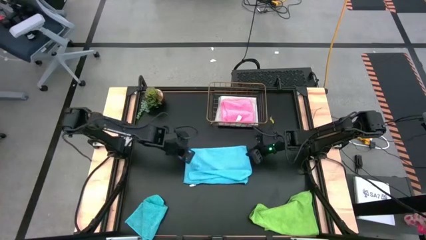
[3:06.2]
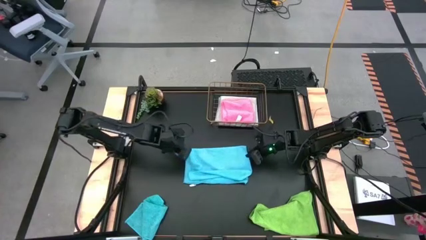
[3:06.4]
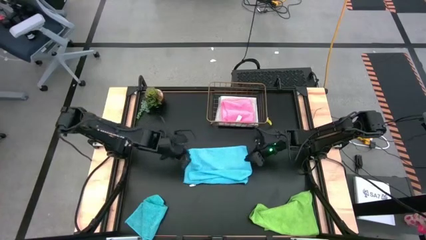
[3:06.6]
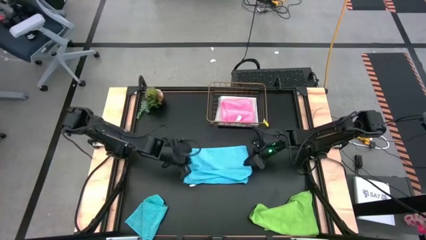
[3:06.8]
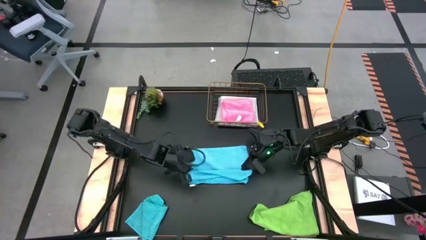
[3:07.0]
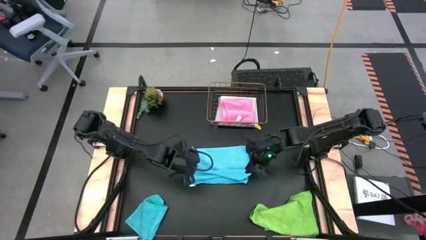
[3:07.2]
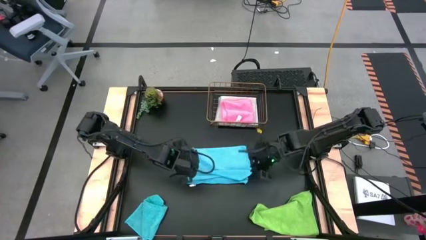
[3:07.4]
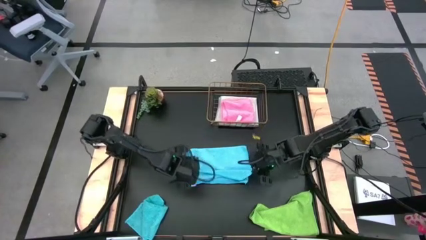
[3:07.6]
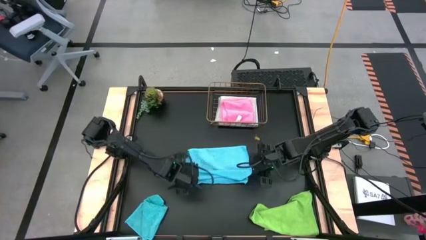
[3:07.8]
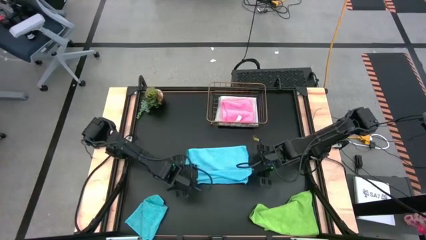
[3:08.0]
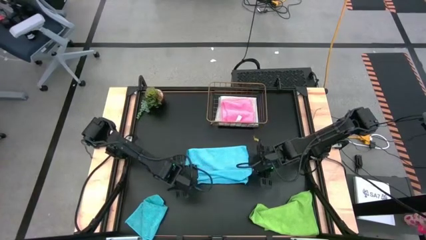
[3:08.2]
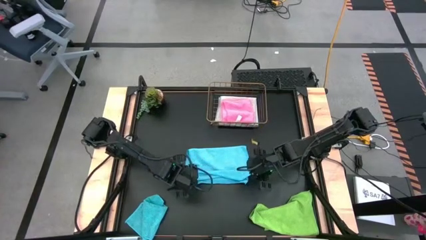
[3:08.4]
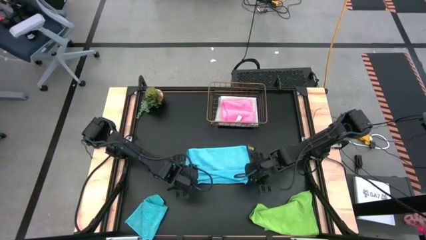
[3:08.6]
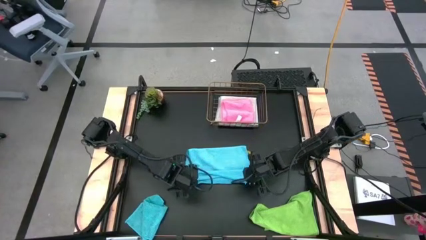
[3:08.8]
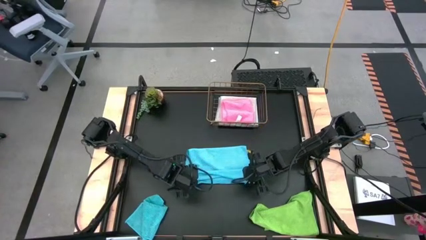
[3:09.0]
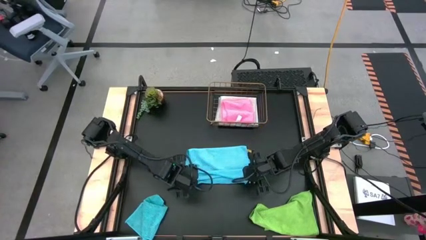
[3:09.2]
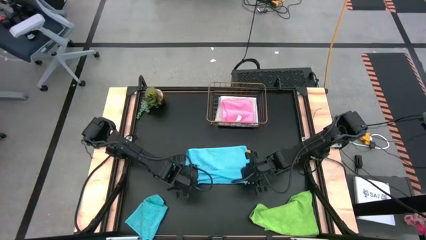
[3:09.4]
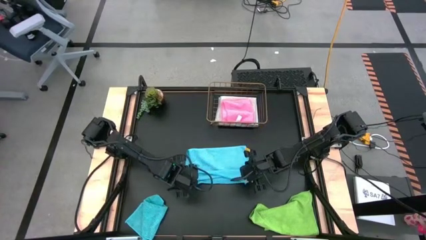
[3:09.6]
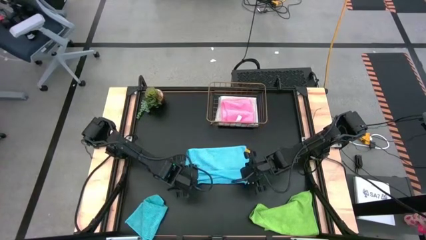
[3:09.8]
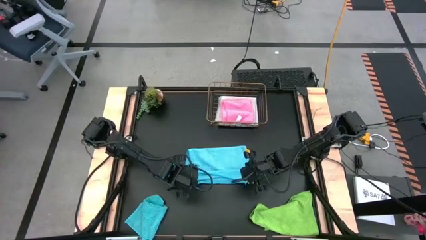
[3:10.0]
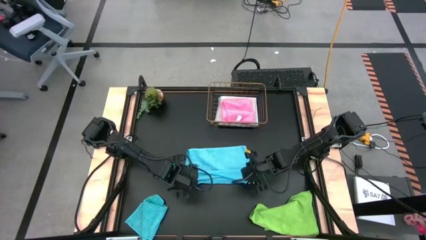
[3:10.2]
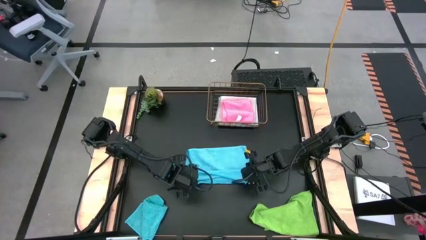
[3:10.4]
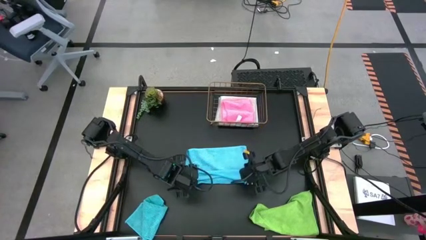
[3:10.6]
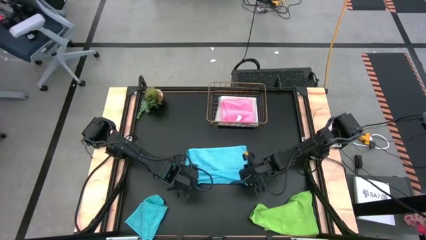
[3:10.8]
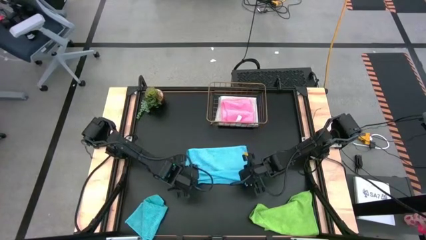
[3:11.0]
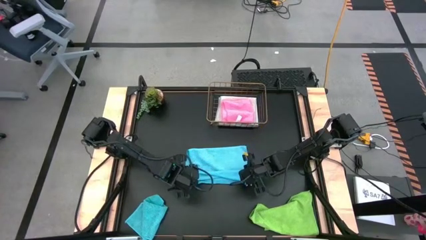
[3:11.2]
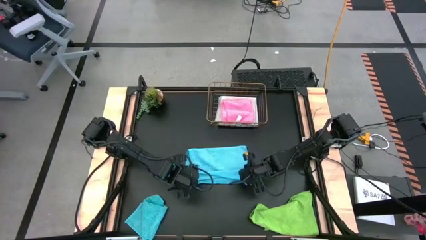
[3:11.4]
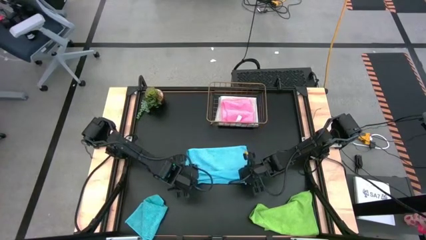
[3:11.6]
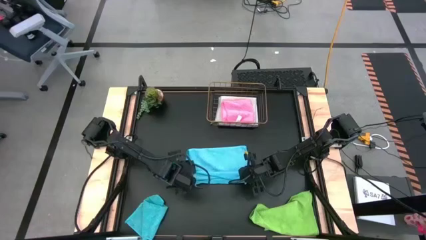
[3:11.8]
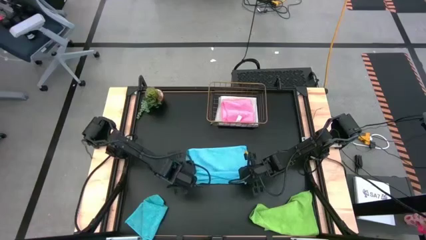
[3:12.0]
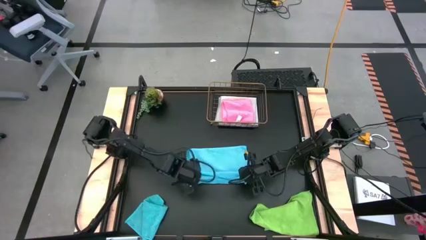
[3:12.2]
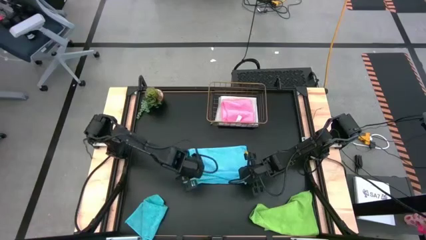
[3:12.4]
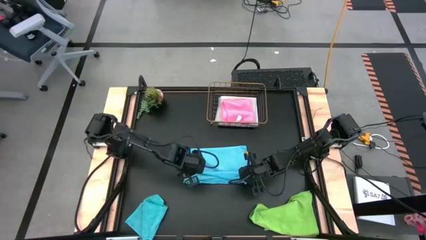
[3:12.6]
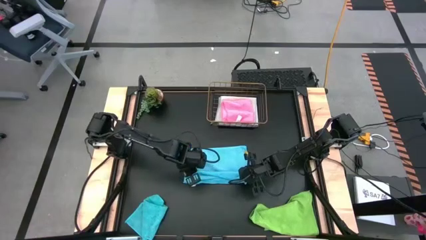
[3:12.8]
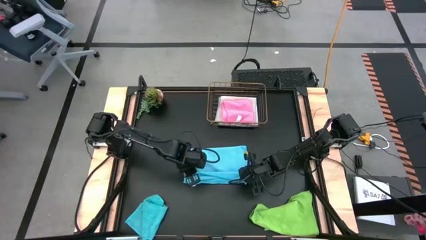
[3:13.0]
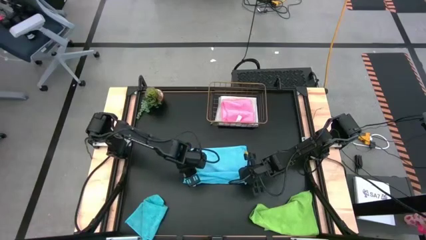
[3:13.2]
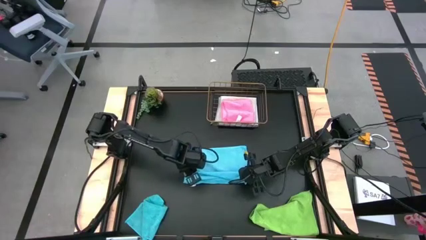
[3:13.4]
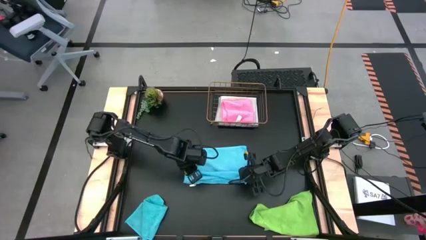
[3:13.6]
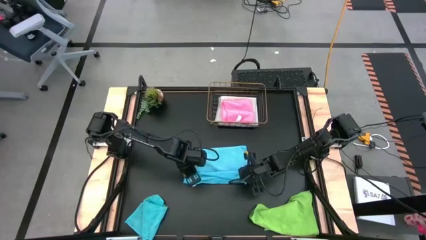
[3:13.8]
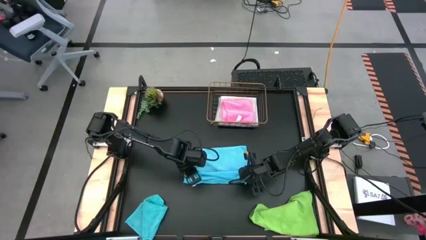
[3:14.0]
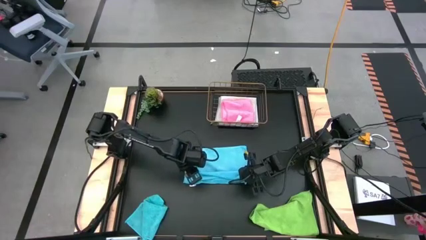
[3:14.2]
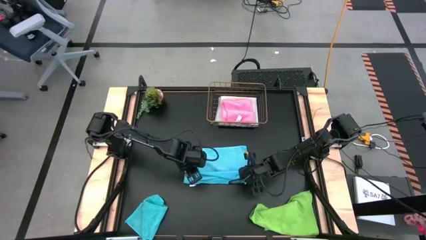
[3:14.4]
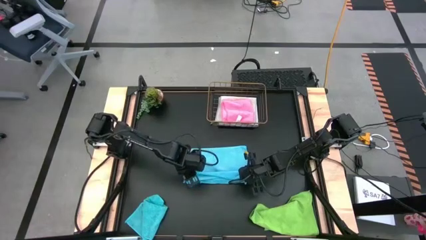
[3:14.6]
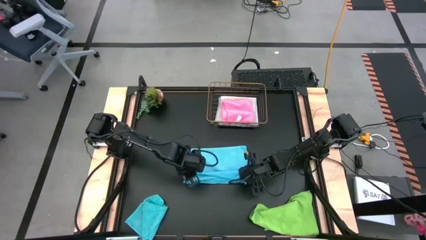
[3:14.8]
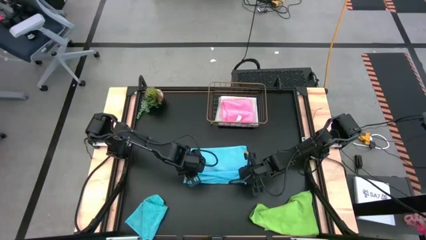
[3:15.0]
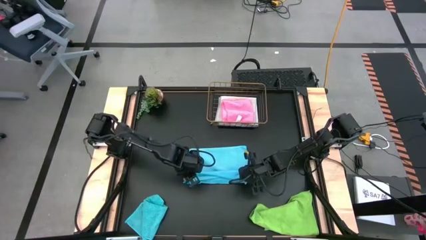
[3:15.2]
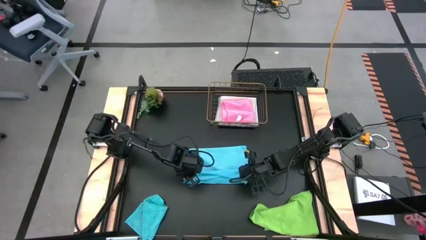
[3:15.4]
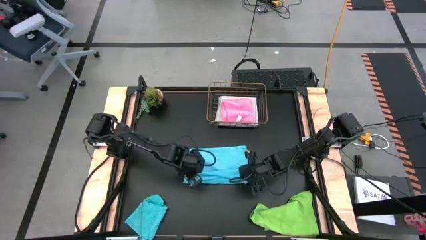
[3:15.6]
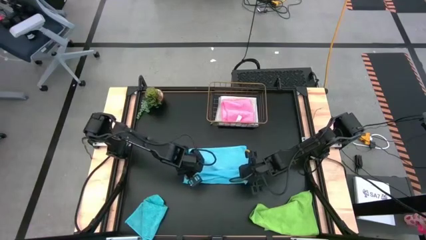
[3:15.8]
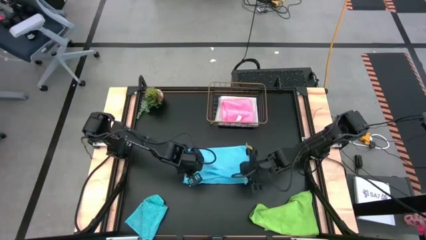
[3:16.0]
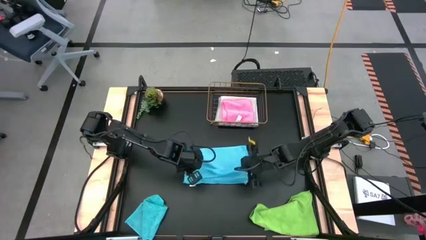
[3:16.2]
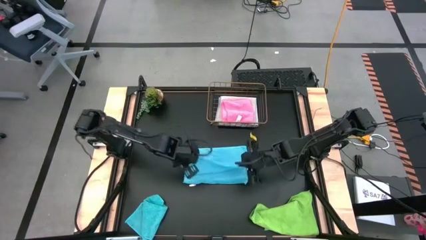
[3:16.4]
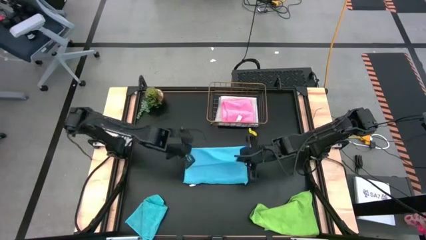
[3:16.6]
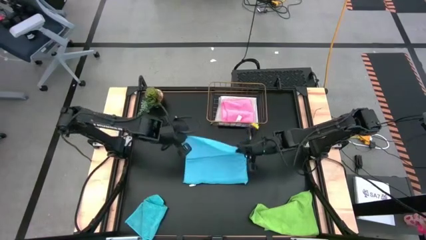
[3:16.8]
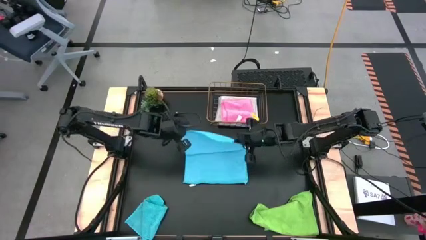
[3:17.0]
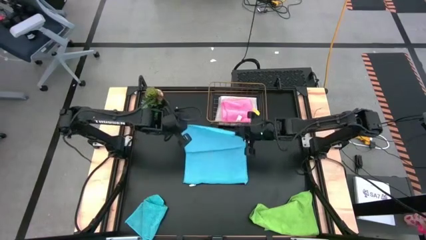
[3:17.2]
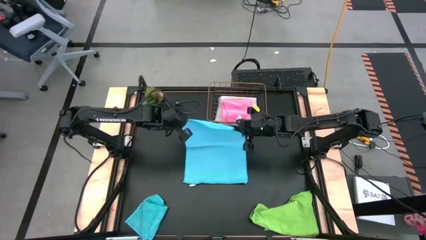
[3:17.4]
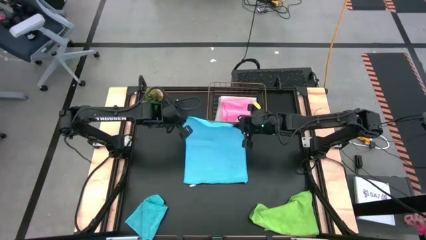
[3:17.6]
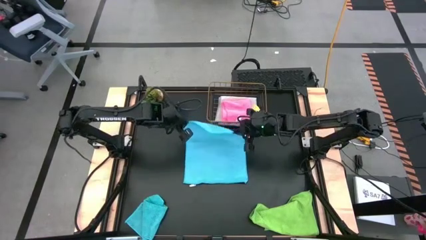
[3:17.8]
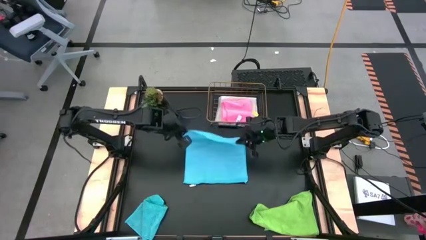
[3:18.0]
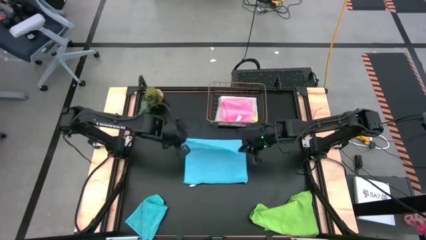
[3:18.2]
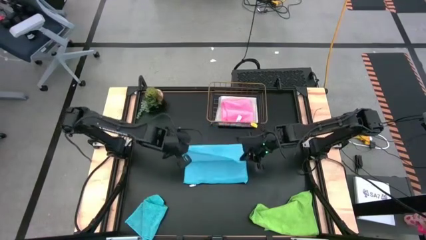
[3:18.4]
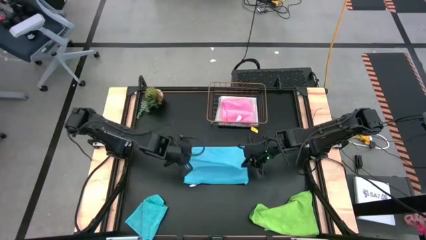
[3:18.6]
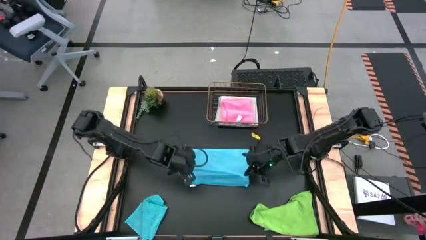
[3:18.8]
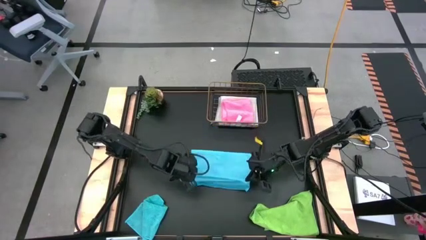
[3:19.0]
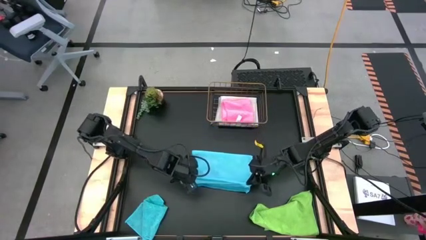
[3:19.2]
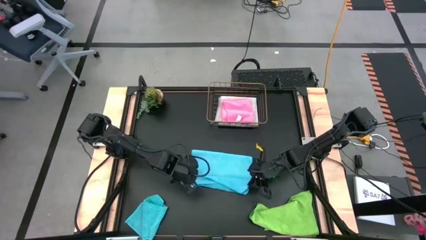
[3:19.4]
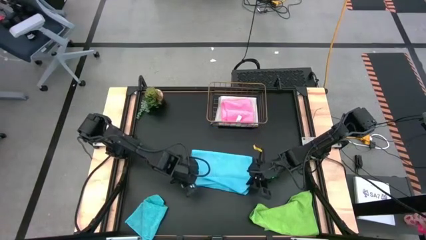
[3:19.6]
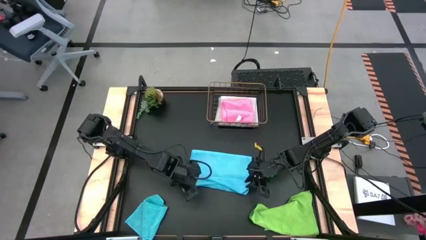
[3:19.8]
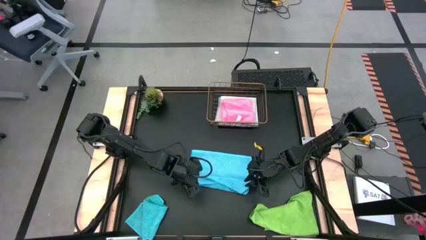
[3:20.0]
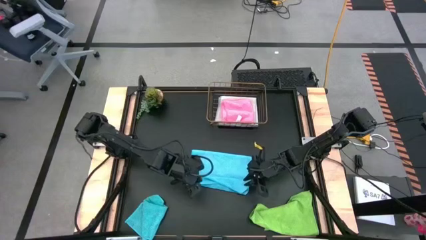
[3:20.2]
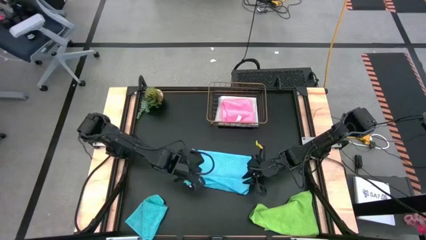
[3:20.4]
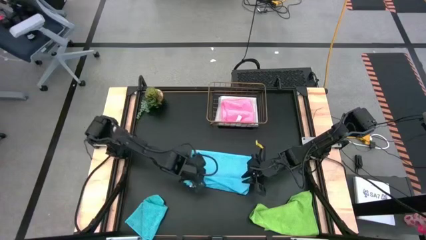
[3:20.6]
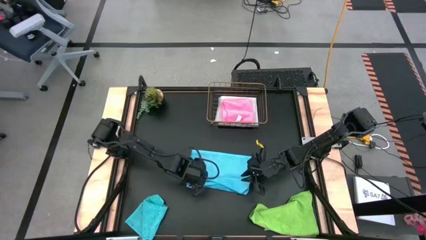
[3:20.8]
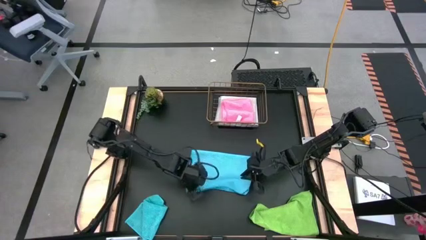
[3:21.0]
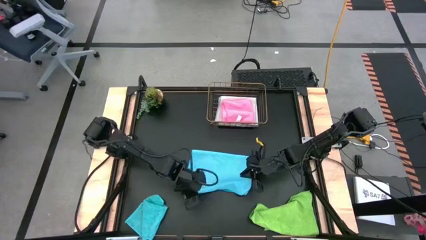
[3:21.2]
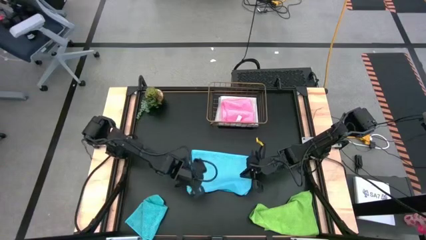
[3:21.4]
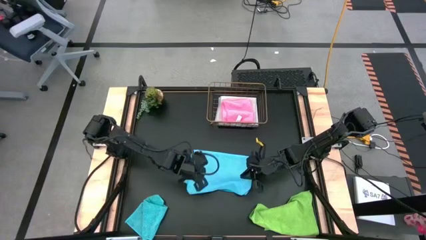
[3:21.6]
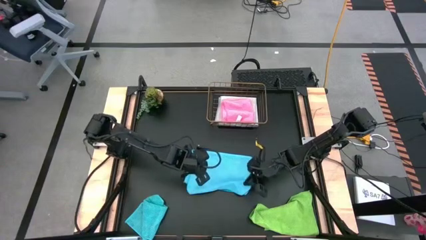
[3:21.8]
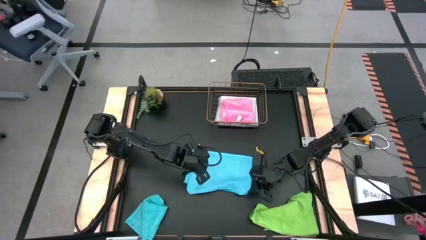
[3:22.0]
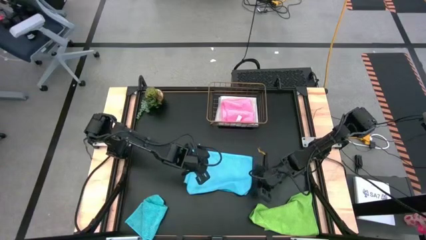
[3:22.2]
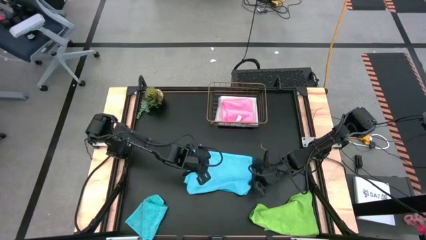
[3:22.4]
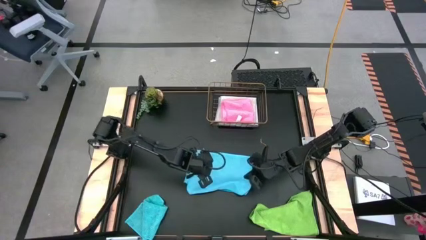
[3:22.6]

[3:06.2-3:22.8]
Task: Fold microfiber towels
Fold the right blue towel
